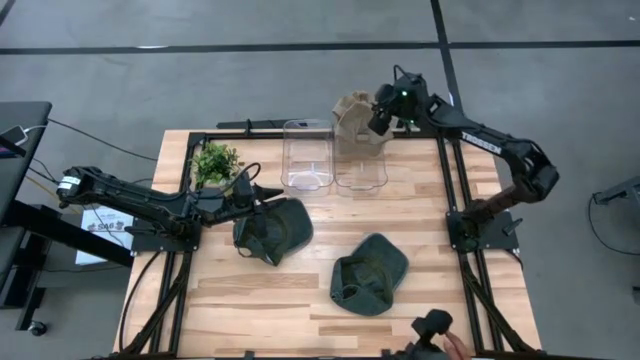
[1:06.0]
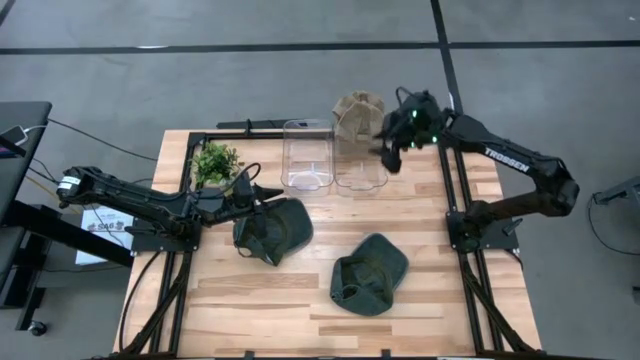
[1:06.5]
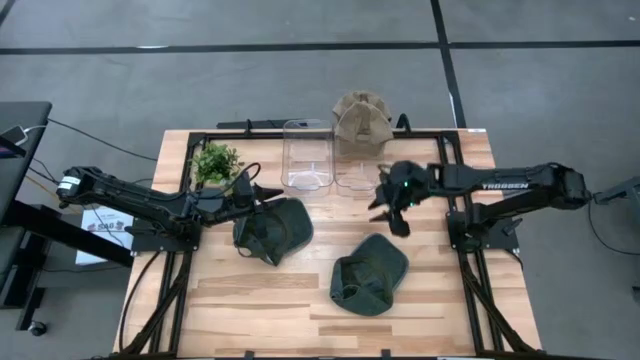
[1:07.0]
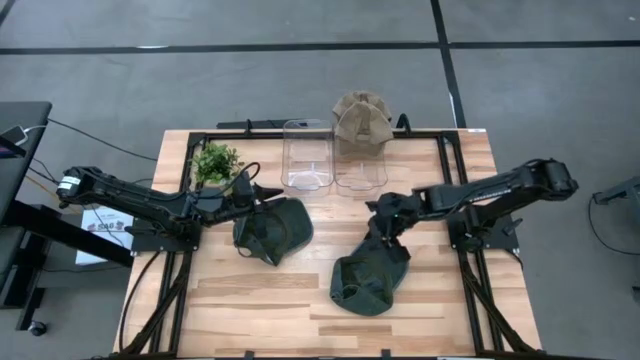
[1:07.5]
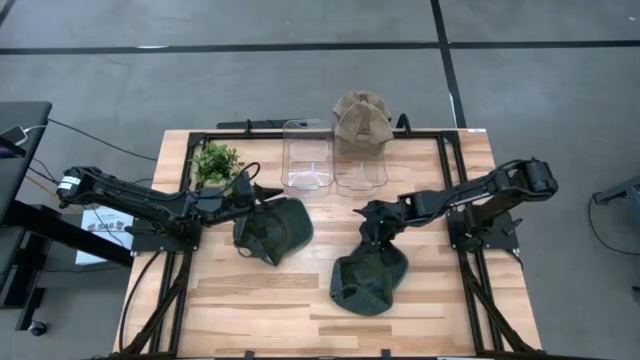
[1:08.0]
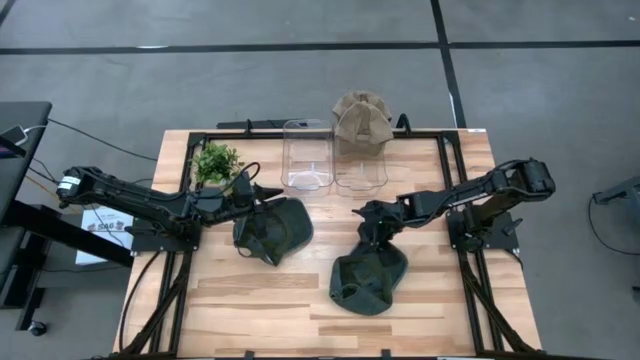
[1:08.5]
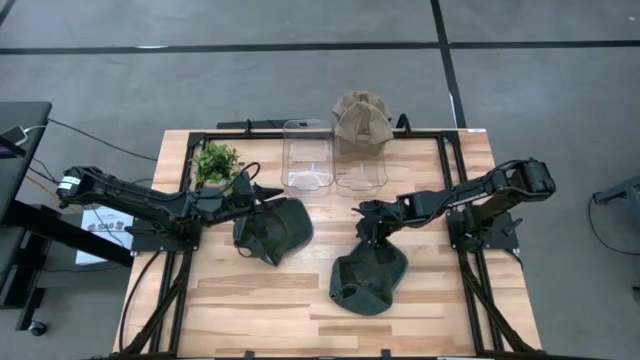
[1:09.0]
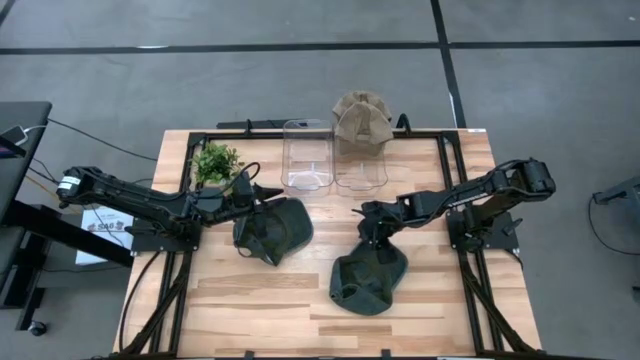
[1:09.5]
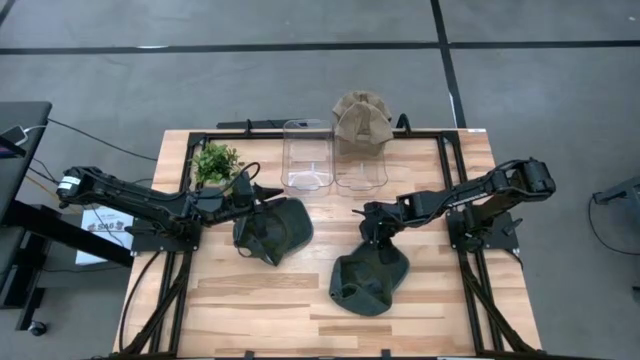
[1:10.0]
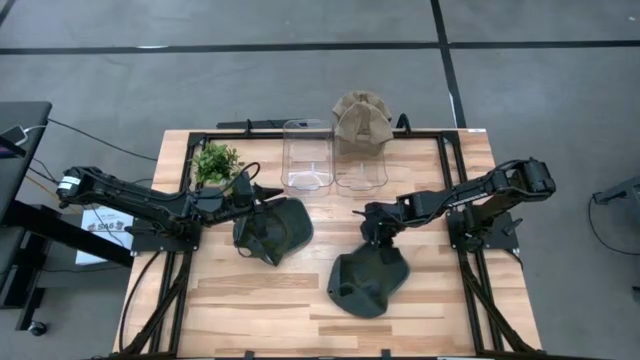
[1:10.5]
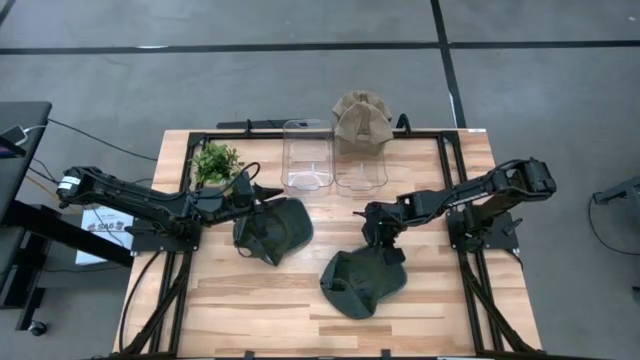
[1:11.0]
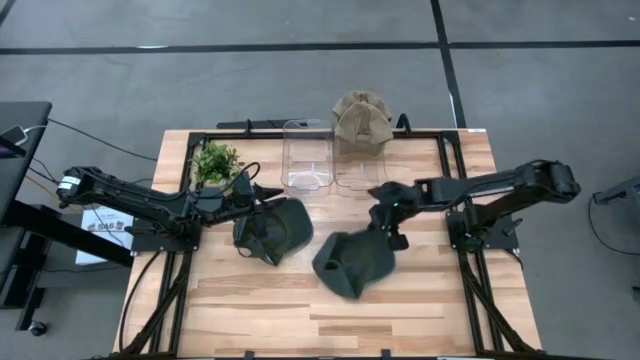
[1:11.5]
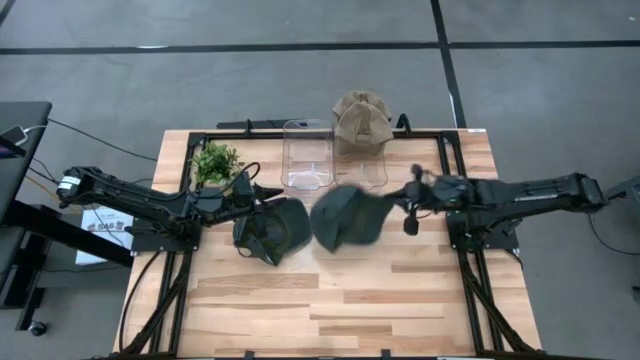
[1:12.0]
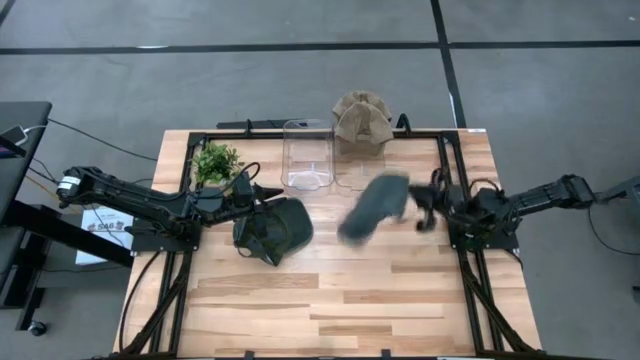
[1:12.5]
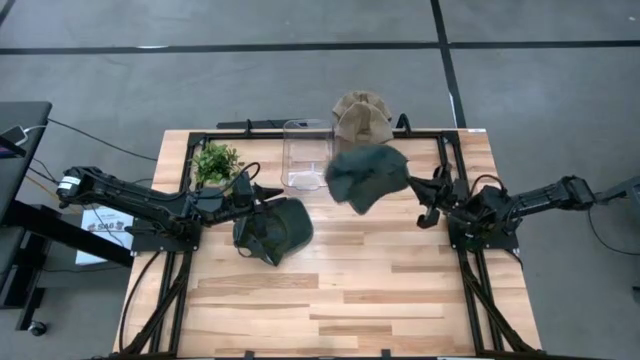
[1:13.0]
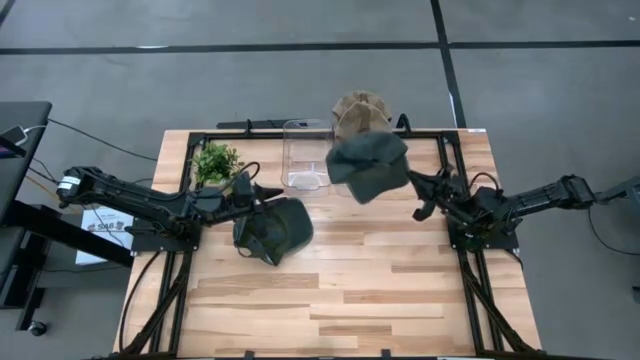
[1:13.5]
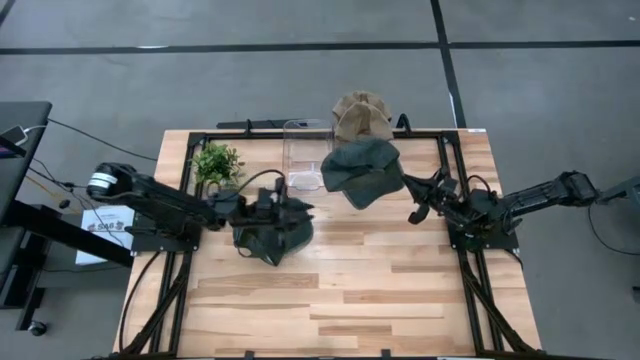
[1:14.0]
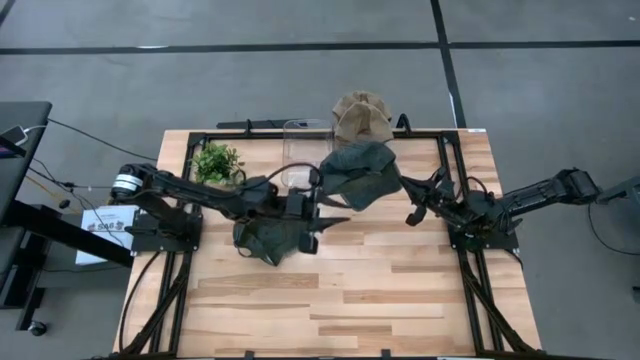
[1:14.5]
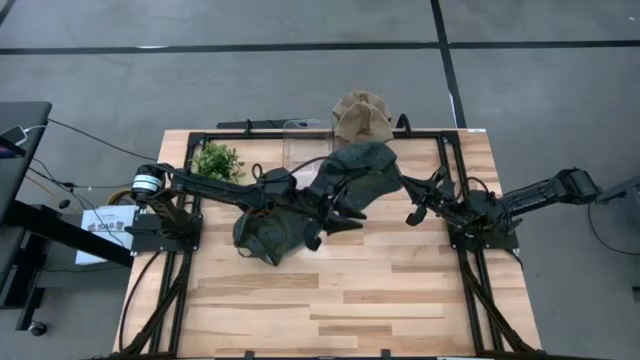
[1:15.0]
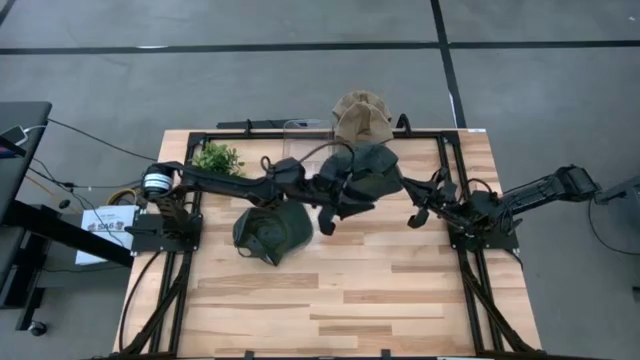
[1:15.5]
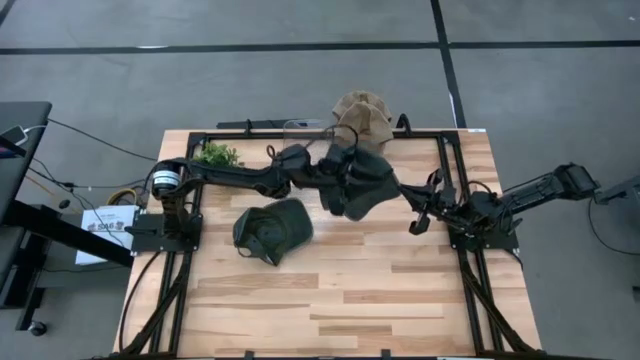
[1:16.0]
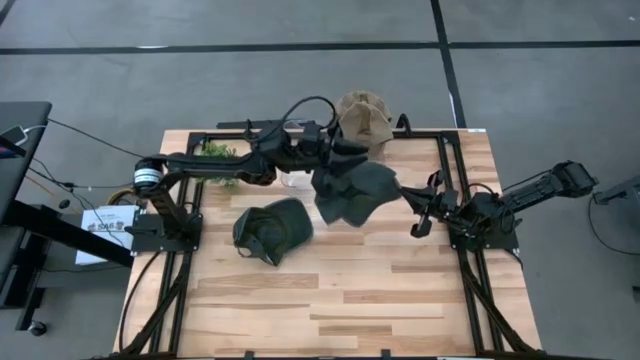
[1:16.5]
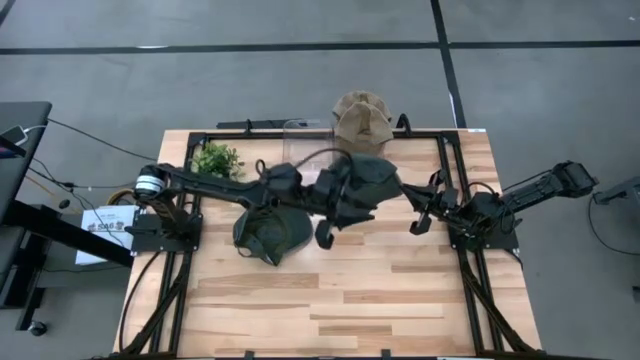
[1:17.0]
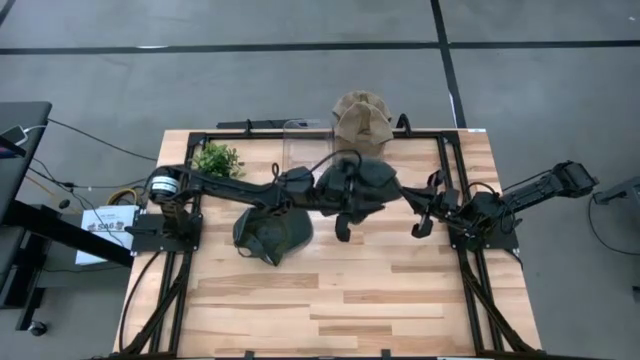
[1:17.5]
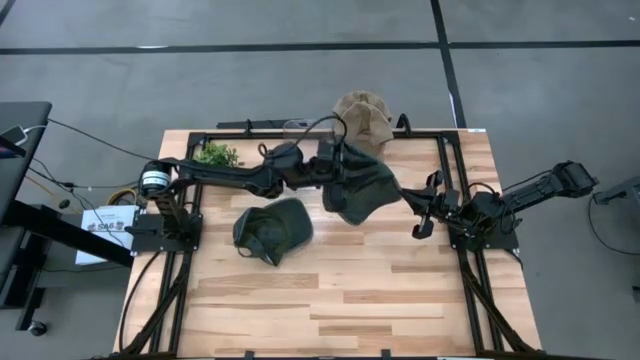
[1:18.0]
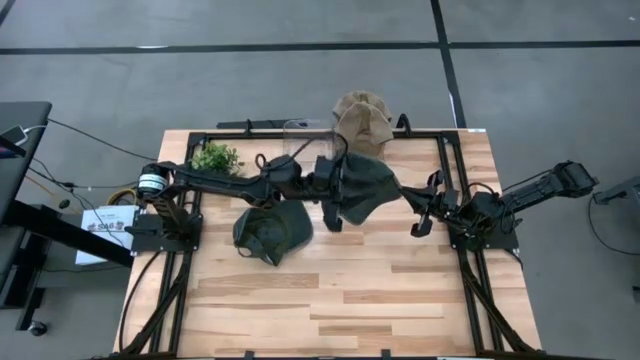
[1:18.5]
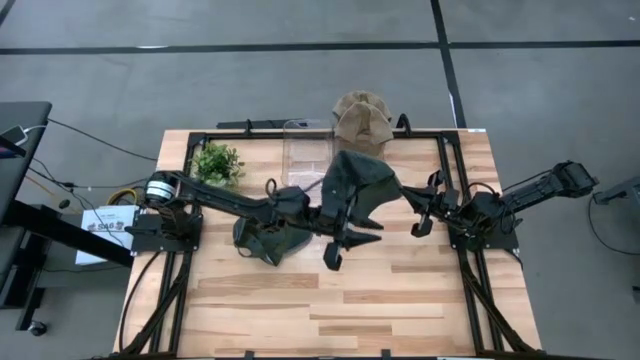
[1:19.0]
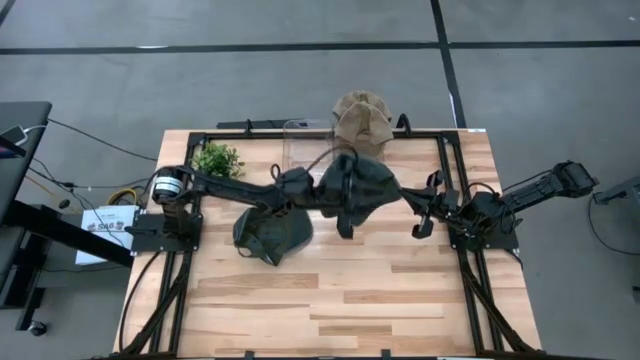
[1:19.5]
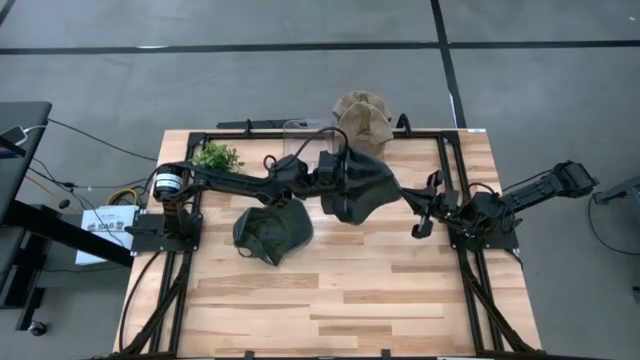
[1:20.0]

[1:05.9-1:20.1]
Task: Pick & Place hat
Put the right black cap into the left transparent bin

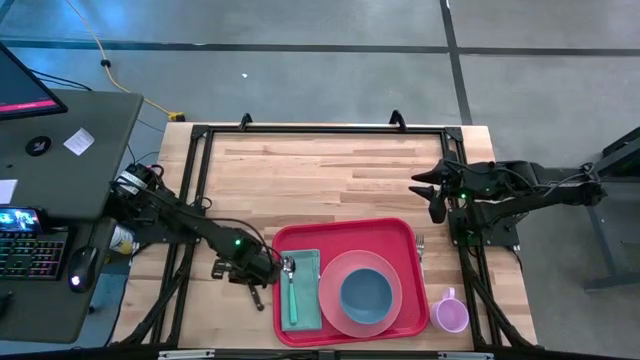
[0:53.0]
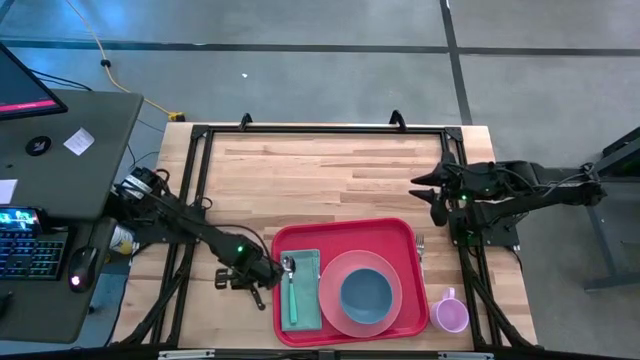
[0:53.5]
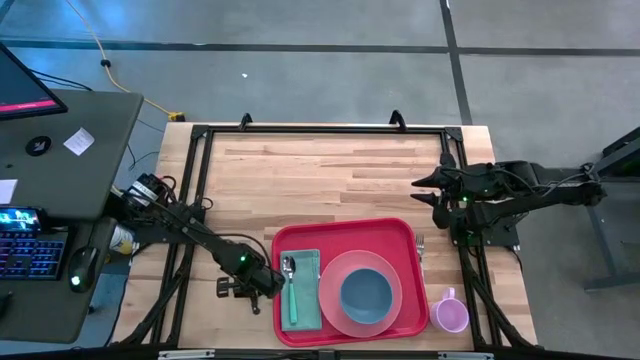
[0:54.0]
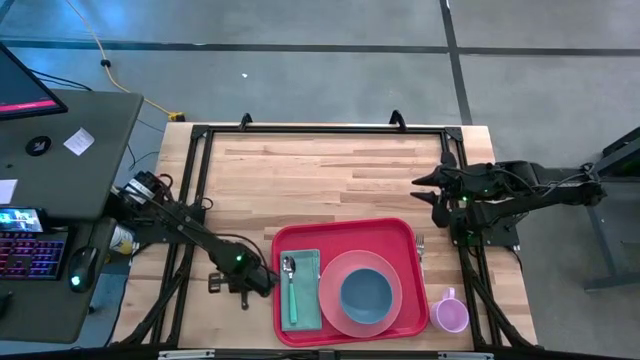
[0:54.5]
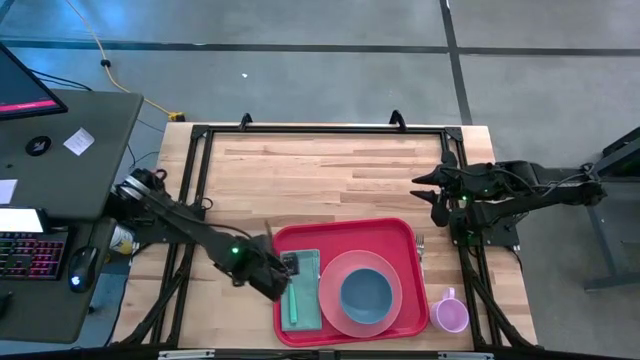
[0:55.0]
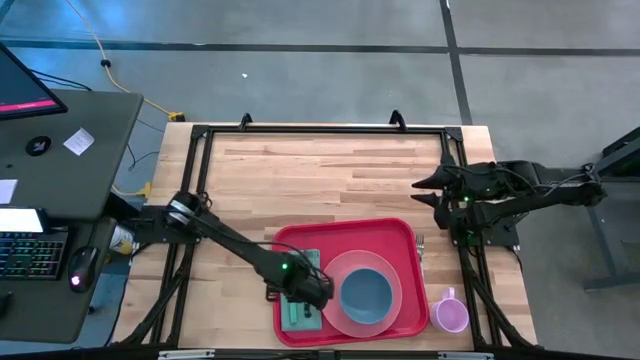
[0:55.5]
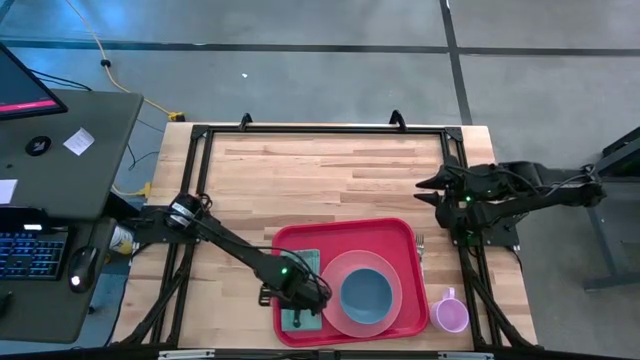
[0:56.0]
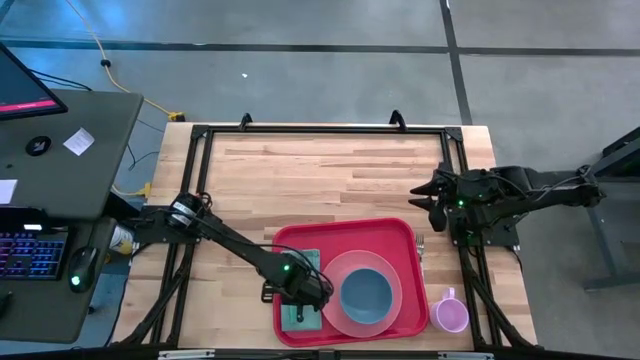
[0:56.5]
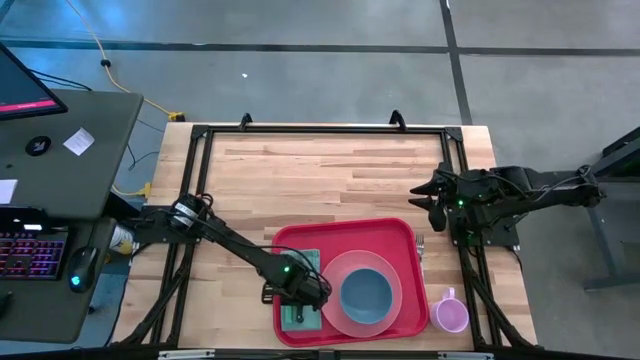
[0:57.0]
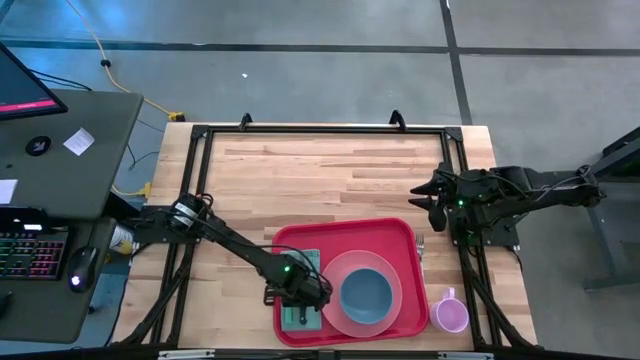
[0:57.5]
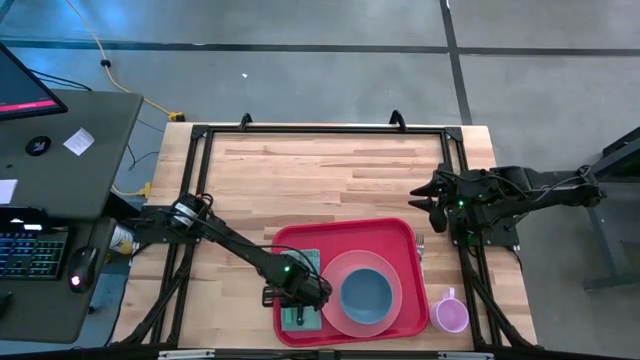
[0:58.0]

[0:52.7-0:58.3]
Task: Set up tray
Put the black knife on the blue napkin to the right of the blue spoon

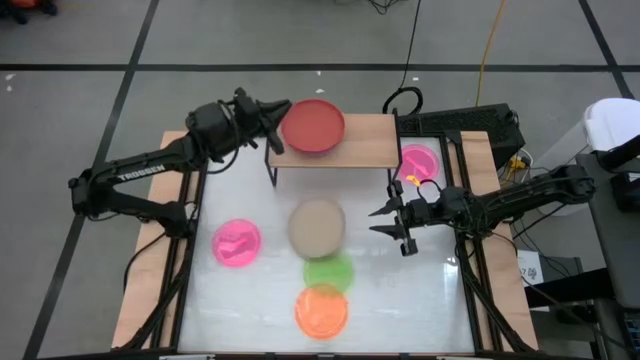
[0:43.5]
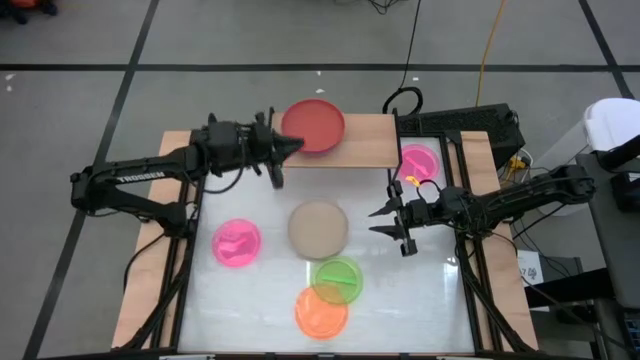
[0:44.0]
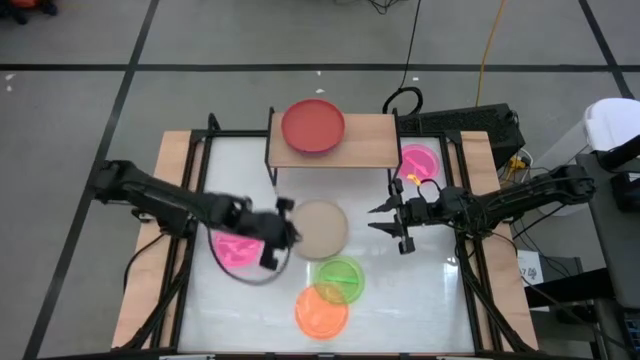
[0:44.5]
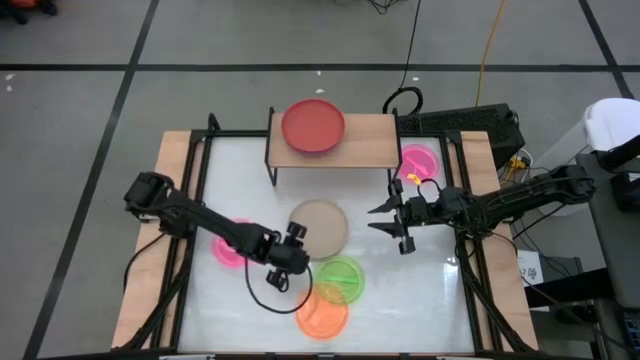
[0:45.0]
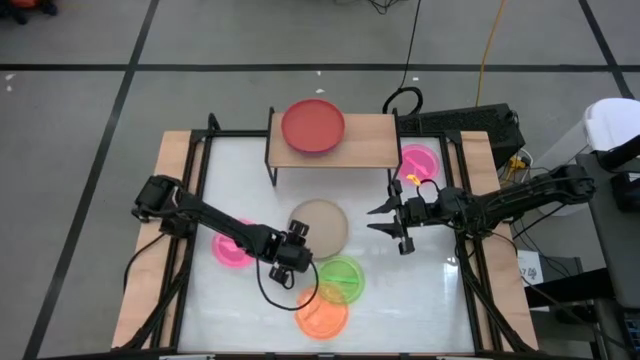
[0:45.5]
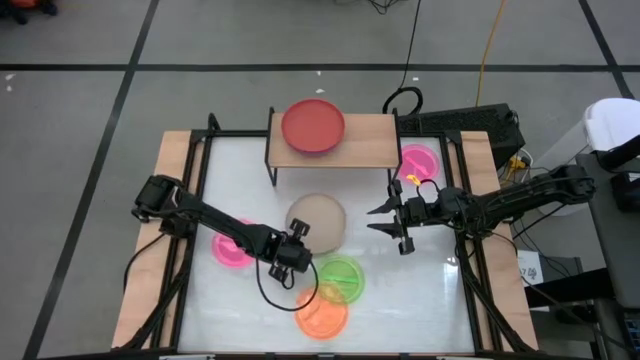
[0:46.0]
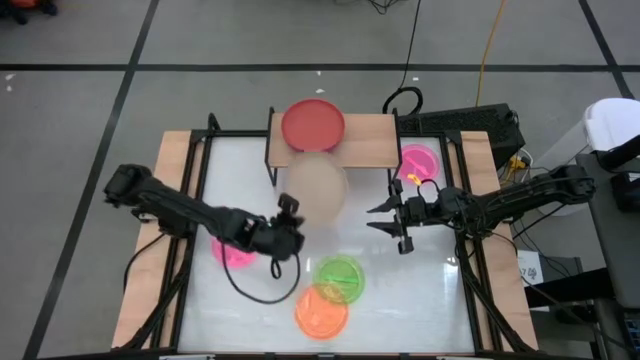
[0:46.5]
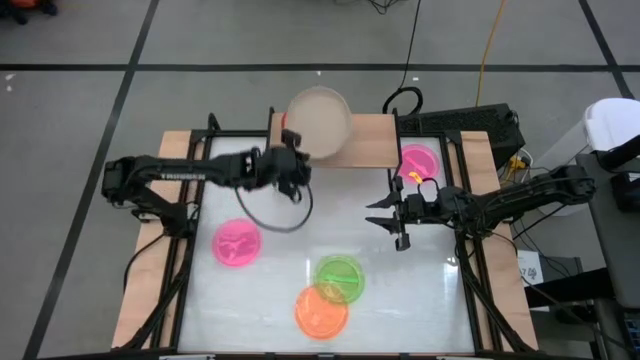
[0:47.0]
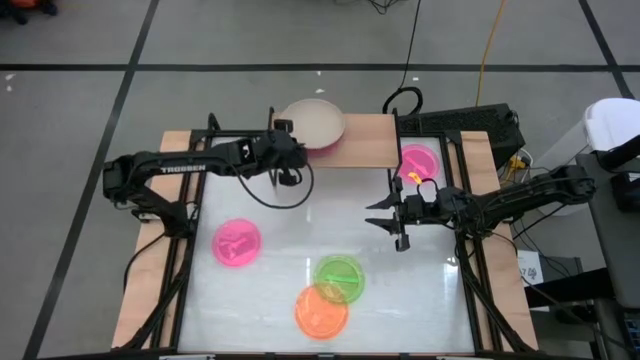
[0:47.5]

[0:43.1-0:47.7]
Task: Place and stack plates onto a shelf
Stack the gray plate on top of the orange plate on the shelf
